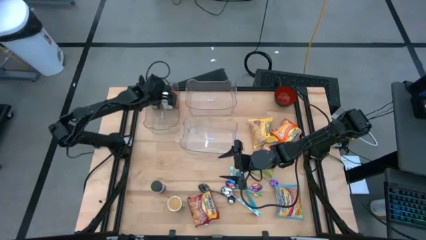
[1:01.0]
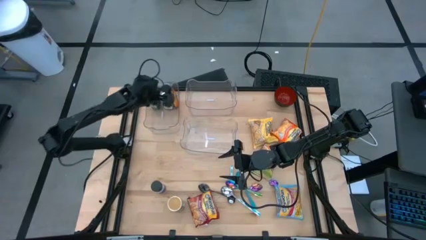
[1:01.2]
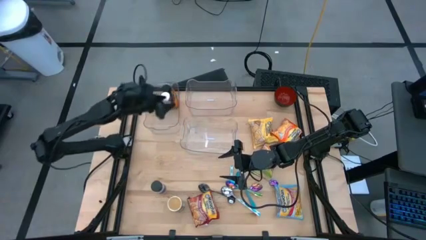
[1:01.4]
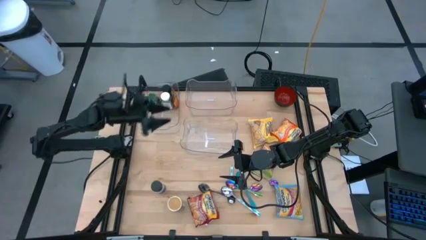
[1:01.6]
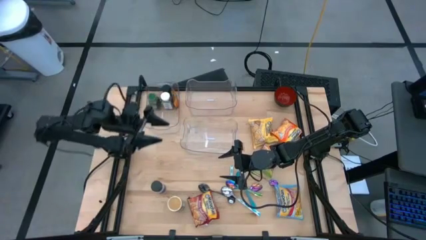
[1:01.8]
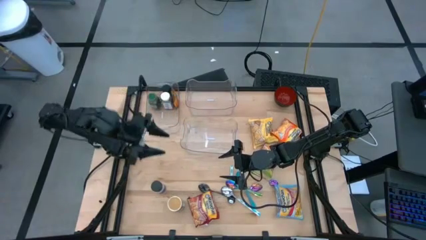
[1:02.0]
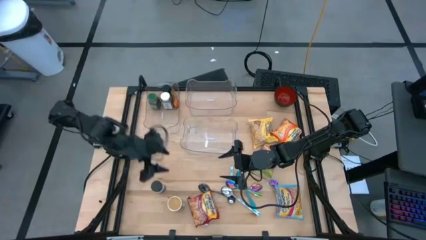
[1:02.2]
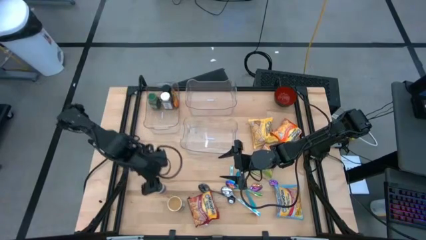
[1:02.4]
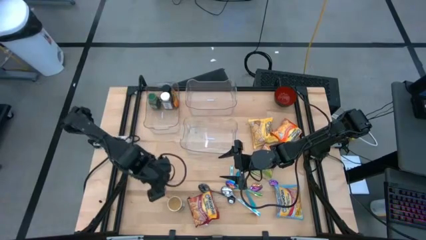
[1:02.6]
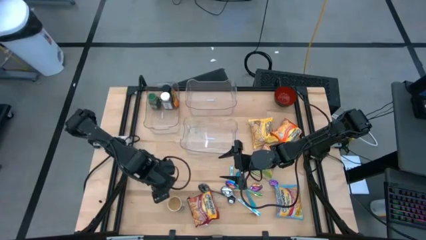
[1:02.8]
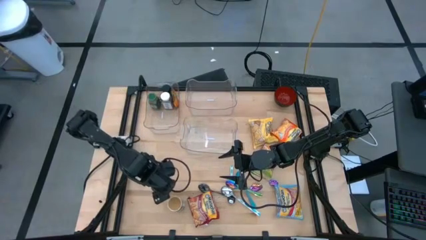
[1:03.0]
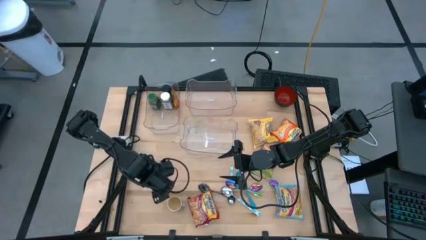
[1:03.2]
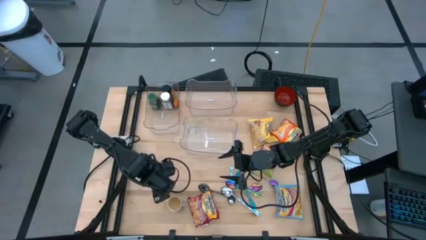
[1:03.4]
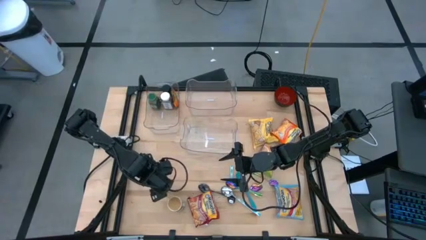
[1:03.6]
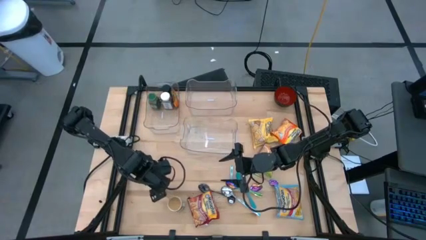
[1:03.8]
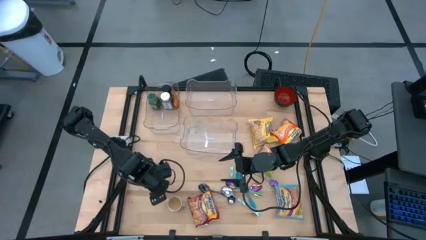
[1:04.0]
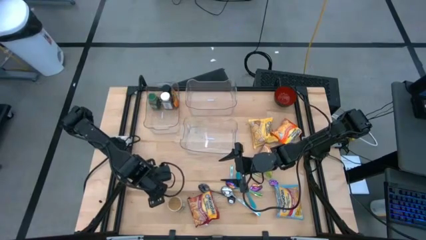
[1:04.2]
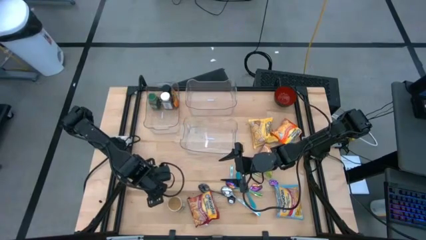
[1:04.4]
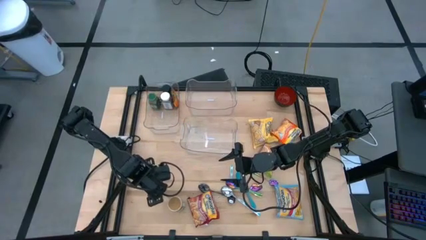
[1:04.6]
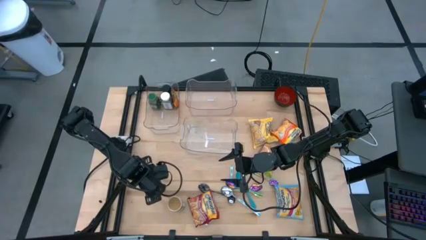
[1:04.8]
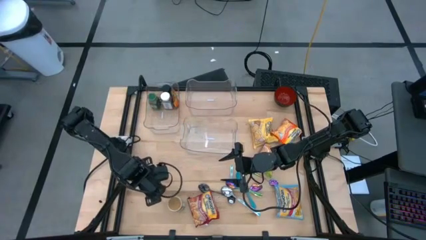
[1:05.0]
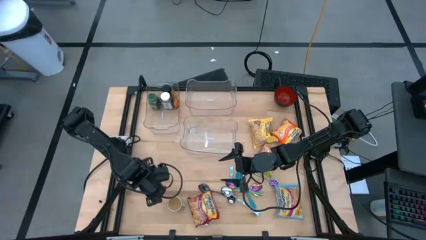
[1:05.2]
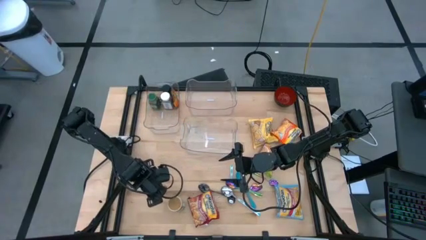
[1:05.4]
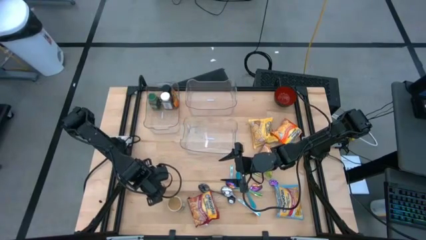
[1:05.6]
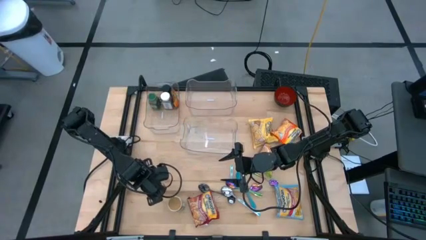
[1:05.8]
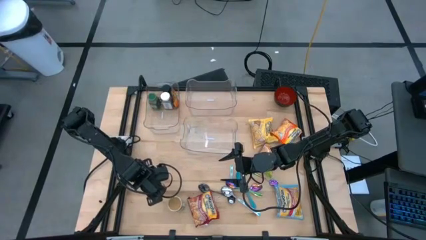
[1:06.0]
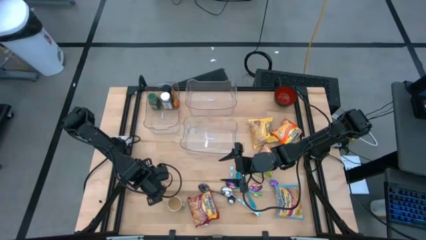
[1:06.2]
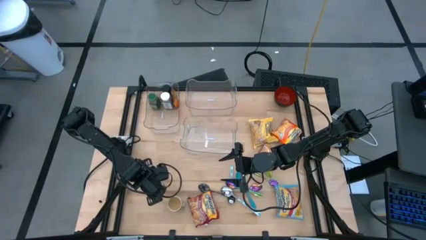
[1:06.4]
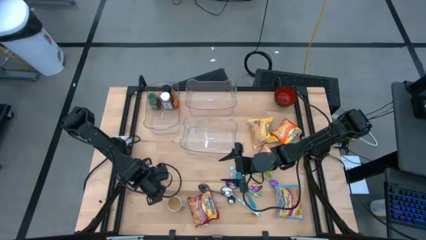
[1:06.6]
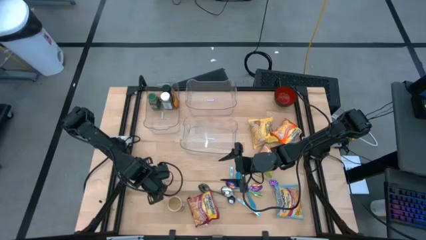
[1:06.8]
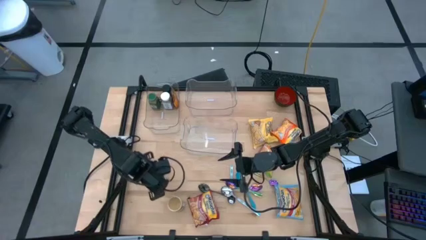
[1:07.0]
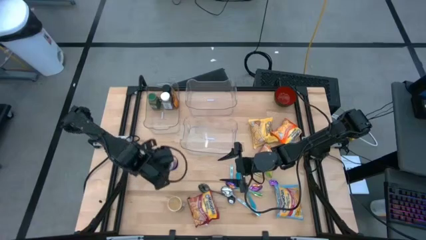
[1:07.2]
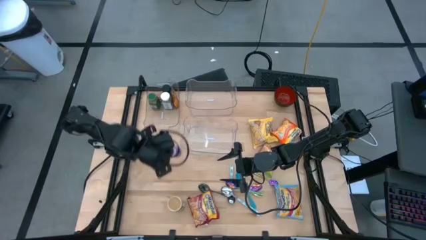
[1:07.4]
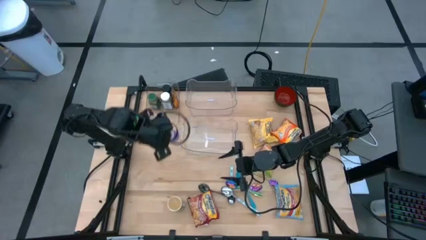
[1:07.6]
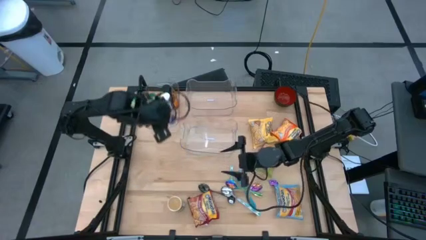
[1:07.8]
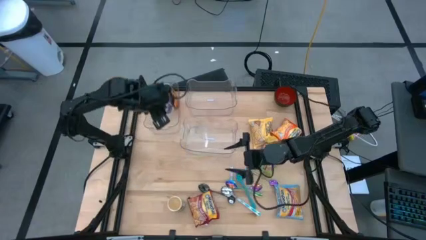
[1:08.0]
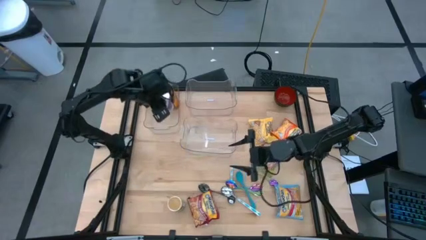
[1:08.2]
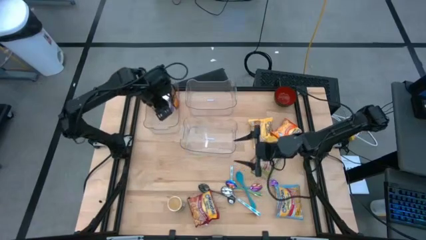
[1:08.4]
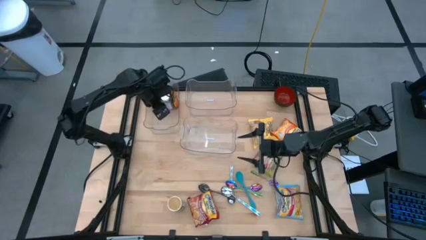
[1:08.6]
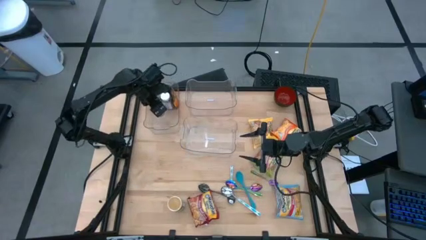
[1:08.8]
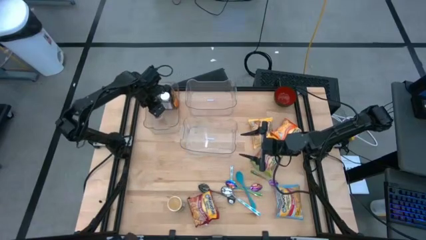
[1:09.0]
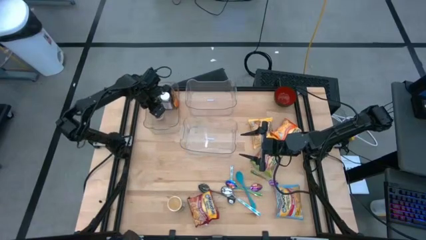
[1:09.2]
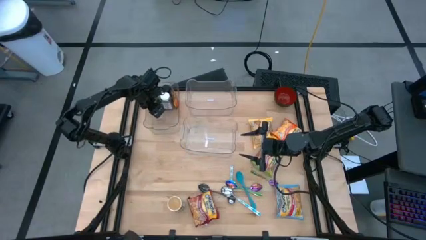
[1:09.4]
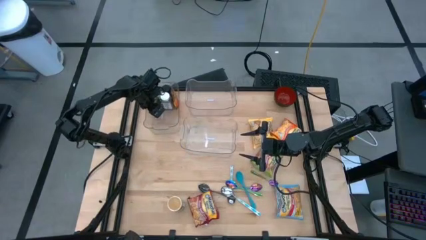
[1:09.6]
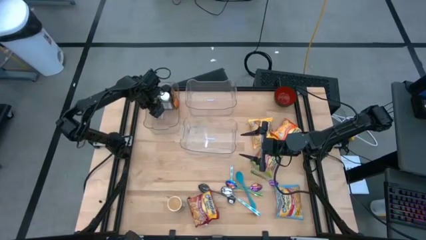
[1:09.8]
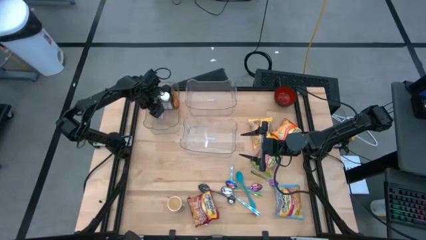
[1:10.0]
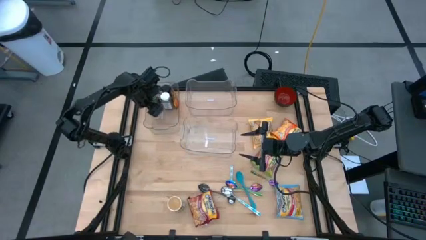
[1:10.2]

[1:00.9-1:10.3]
Task: Pick & Place Food Item
Put the purple seasoning bottle into the top left transparent bin

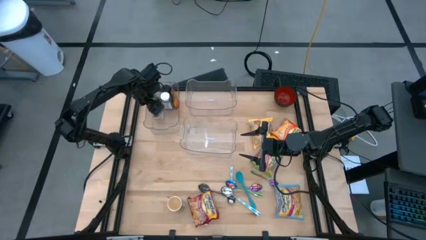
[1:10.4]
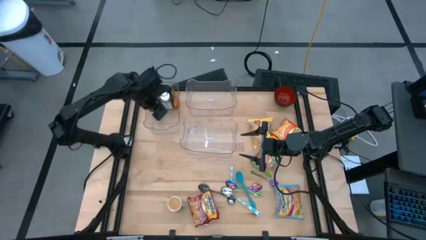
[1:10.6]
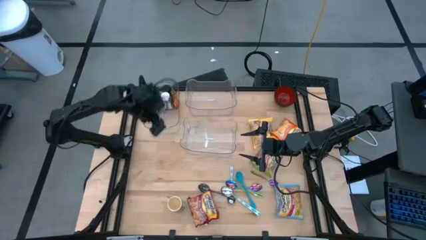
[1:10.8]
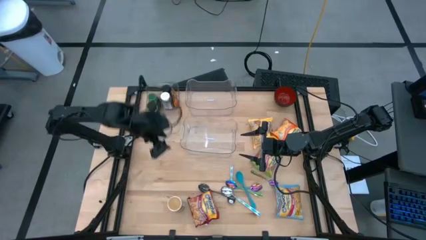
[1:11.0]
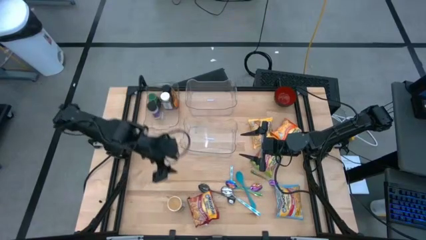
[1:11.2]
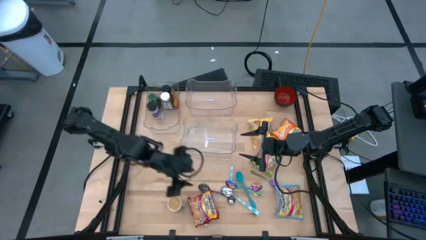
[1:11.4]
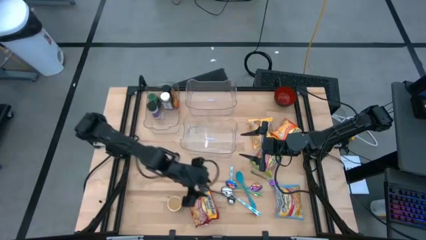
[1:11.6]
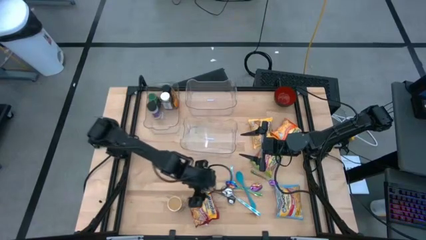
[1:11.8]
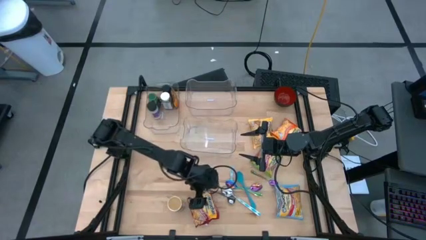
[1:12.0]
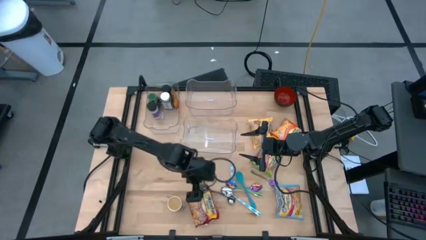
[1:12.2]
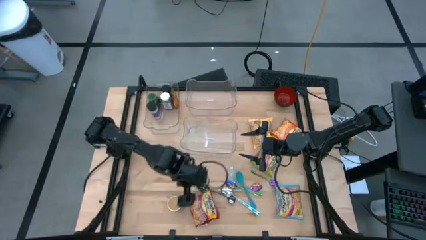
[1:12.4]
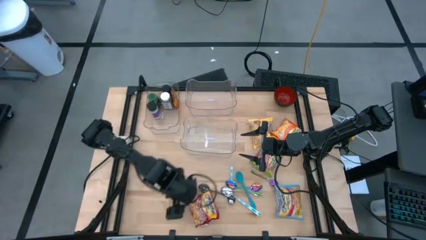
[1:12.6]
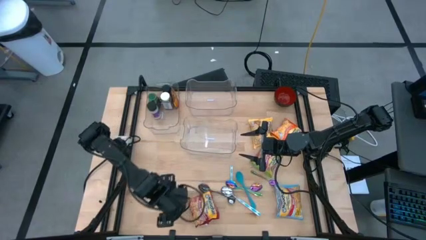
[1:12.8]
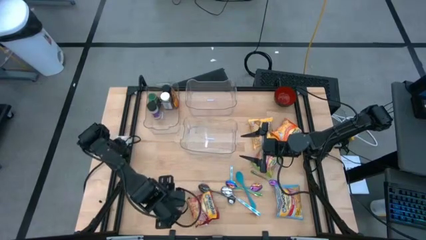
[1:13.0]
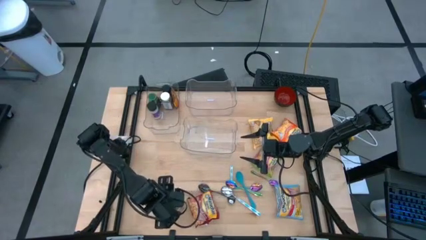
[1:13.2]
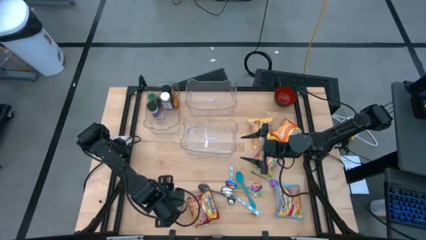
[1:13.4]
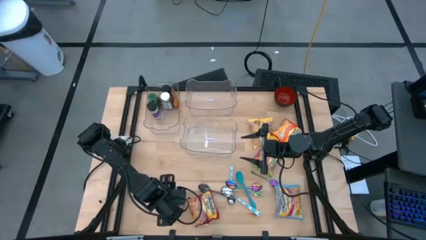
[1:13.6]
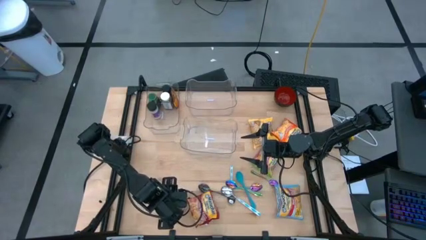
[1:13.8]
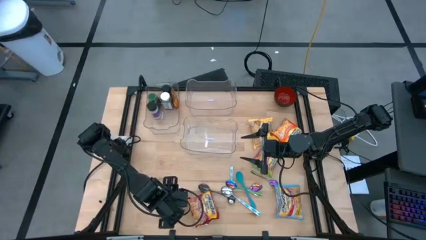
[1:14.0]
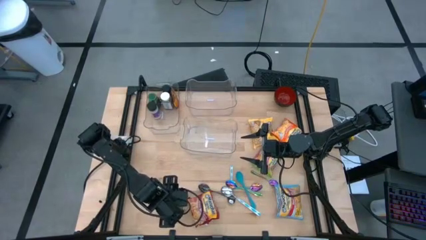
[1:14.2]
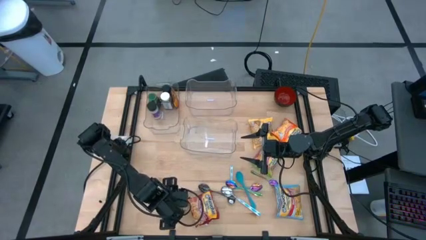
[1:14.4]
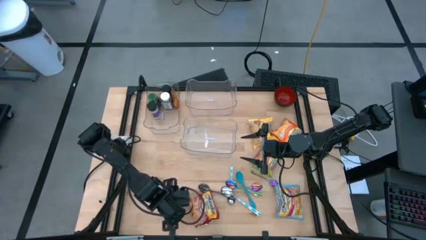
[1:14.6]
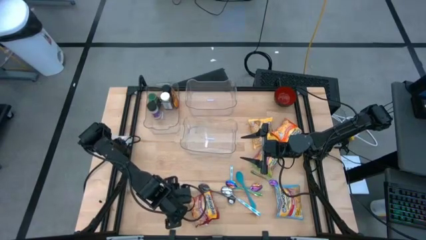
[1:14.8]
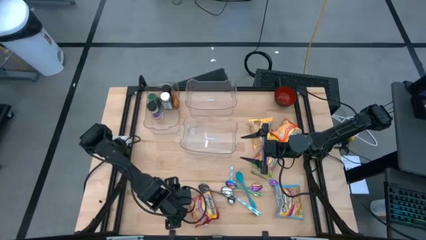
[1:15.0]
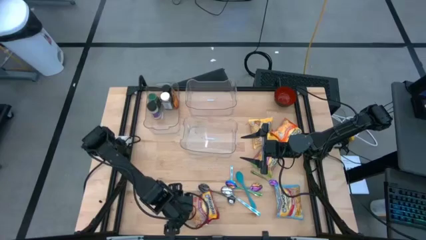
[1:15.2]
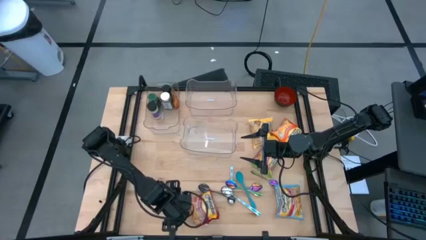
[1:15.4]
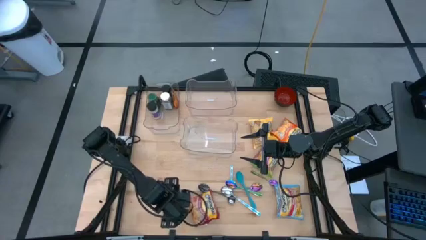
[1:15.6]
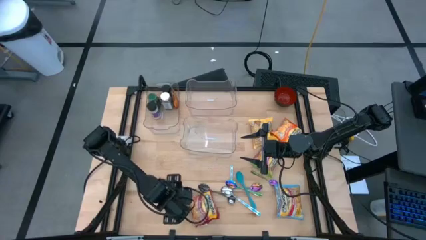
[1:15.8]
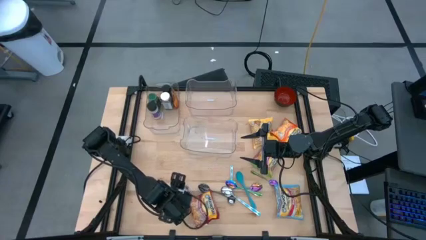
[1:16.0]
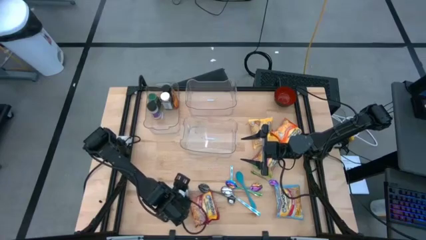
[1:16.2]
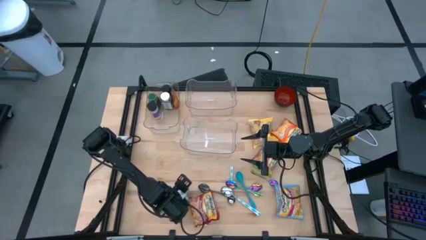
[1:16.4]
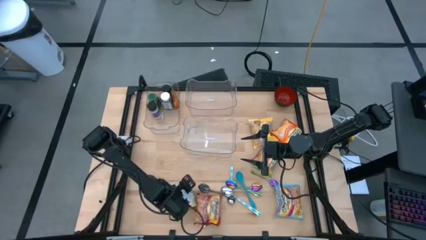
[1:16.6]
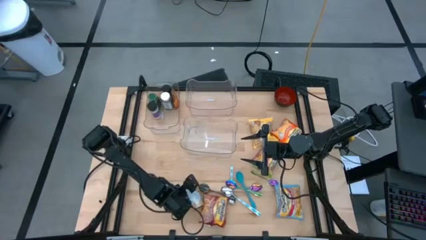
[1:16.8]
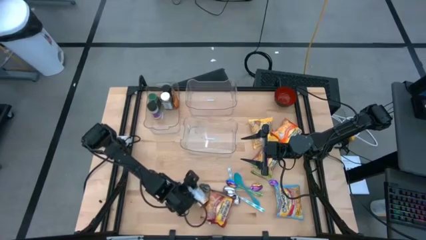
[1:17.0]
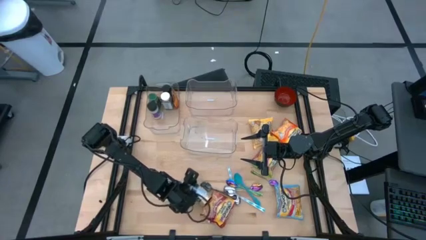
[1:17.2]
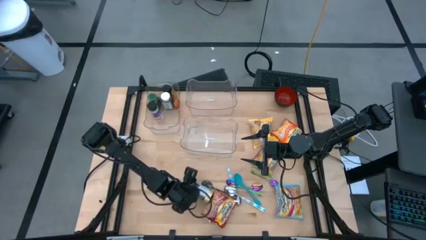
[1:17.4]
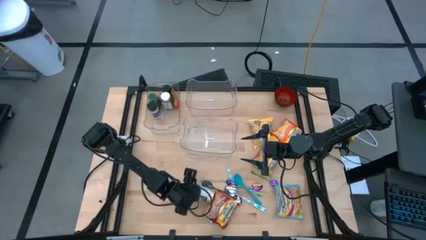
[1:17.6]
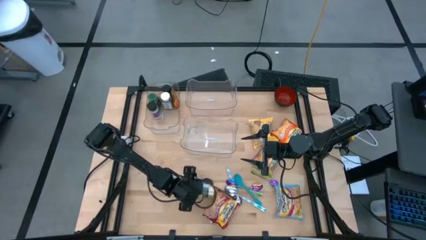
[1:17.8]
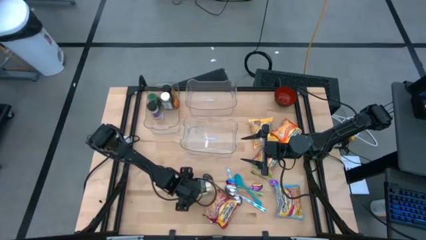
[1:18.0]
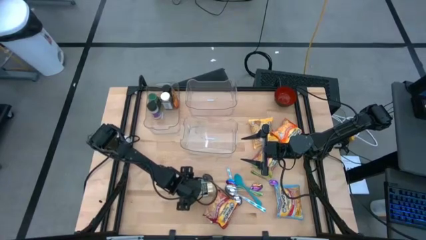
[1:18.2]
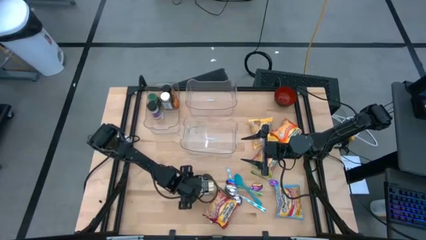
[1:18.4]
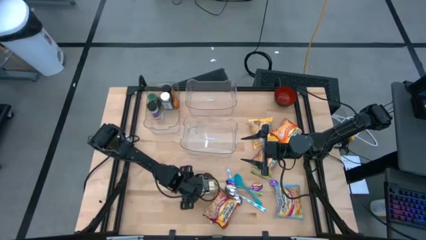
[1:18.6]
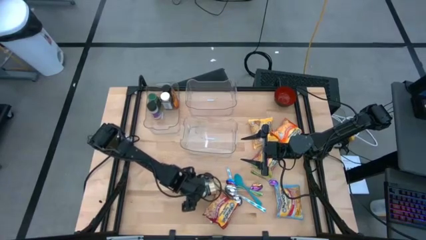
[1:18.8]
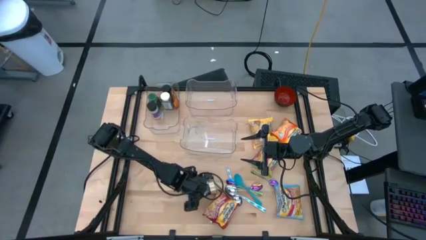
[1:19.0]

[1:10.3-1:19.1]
Put the gold seasoning bottle into the top left transparent bin
